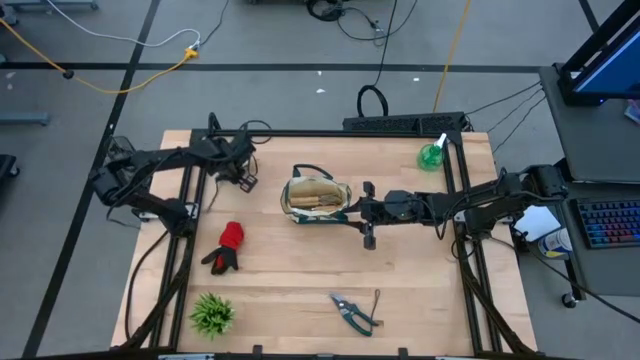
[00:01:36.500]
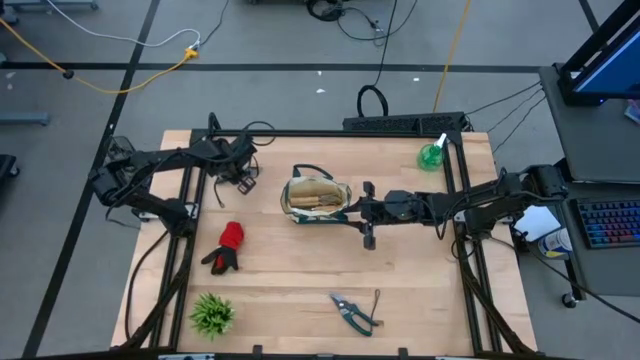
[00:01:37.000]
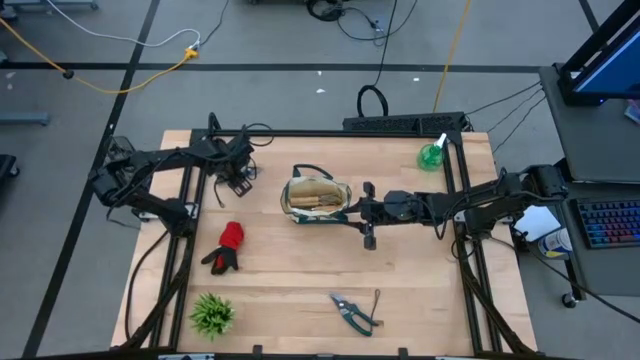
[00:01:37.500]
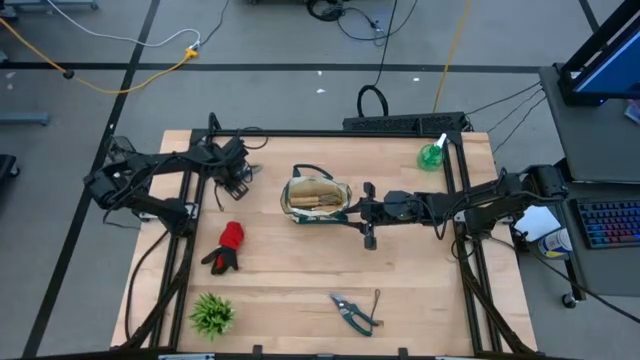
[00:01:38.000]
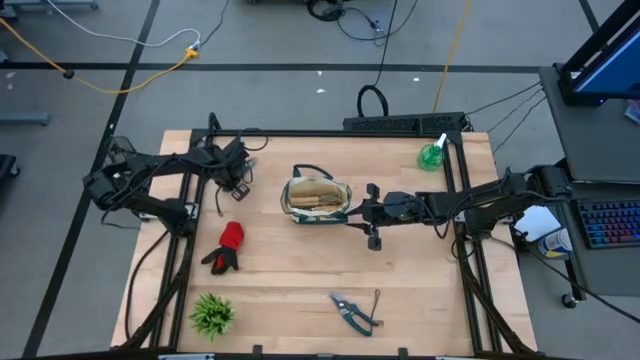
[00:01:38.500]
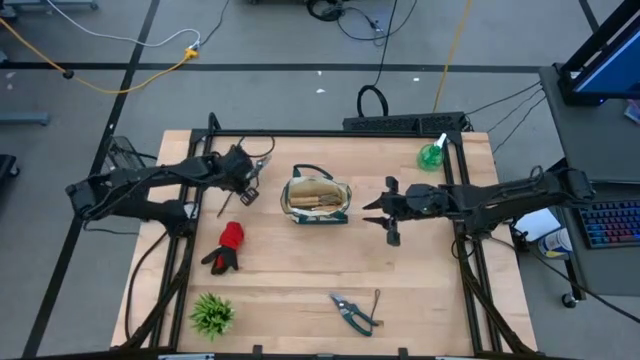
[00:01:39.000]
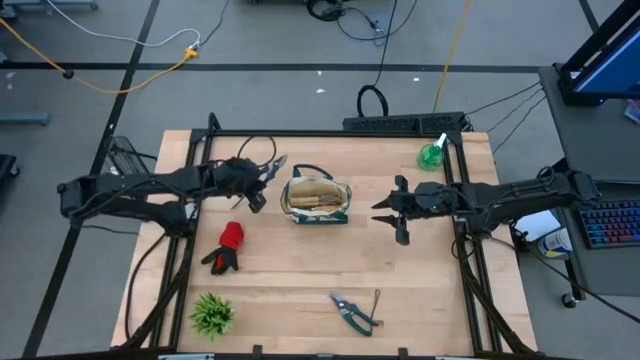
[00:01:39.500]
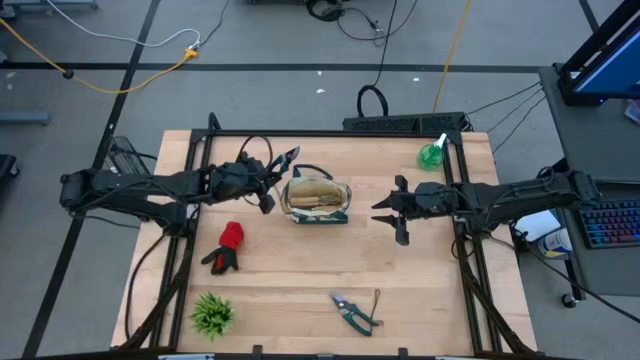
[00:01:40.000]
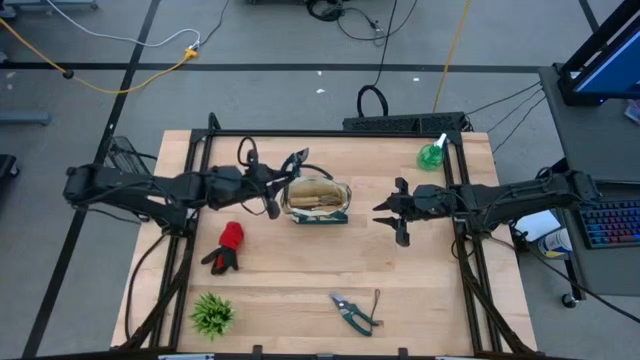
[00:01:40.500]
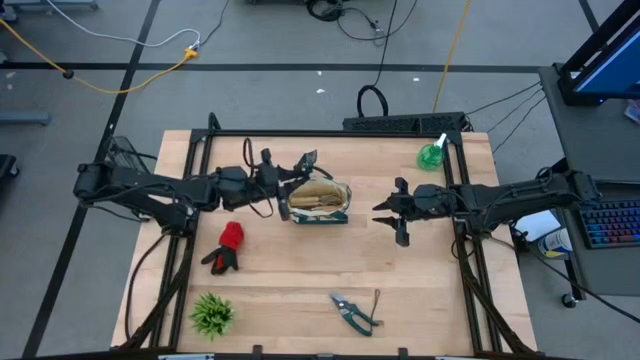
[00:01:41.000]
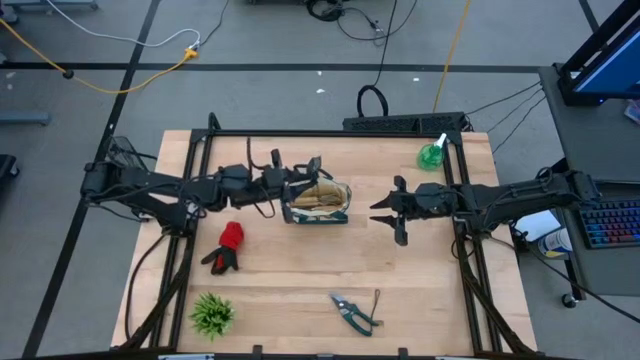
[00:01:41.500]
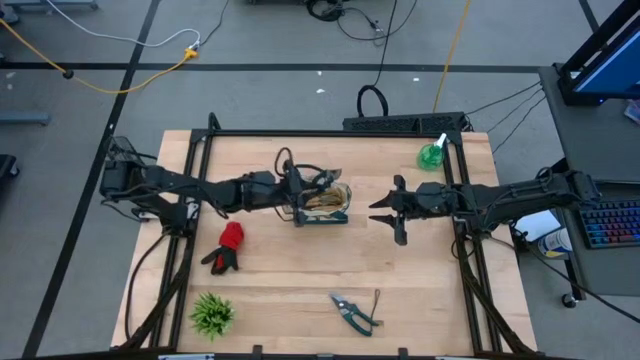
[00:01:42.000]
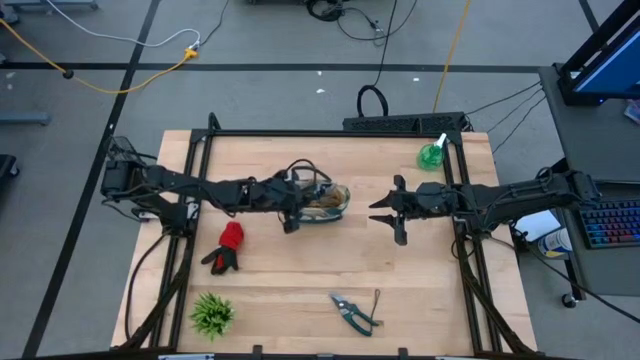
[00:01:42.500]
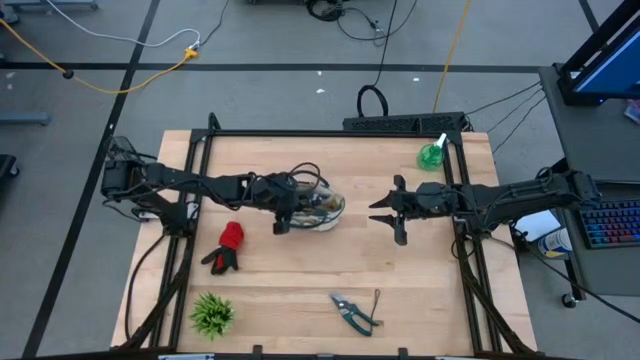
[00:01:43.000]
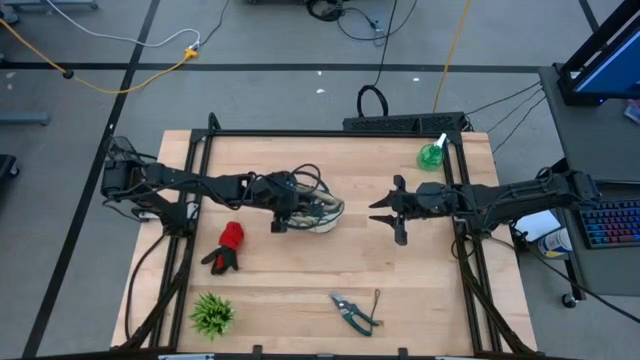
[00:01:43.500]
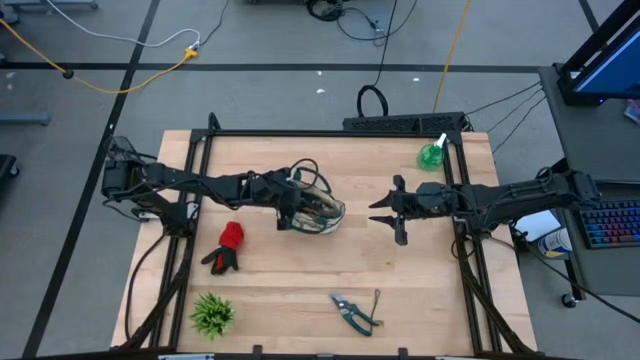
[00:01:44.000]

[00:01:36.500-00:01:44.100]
Task: Pick & Place Garden tools in Gardening bag
Put the top green shear scissors into the gardening bag

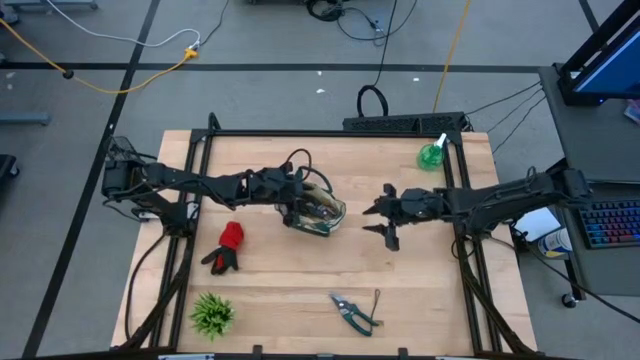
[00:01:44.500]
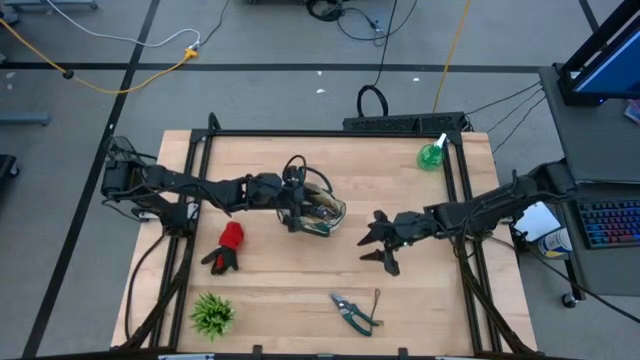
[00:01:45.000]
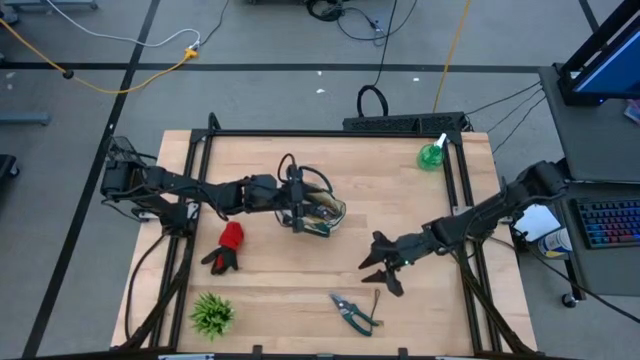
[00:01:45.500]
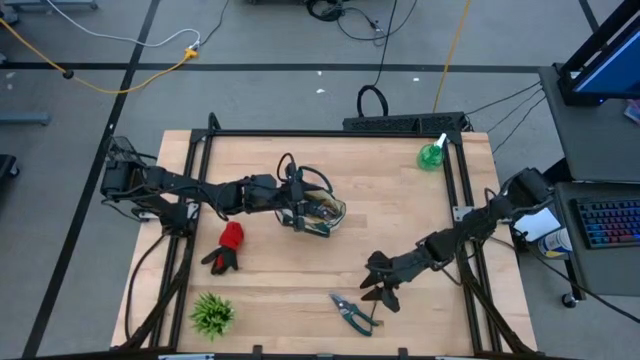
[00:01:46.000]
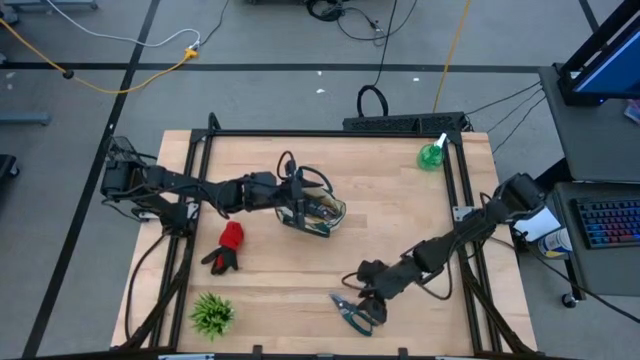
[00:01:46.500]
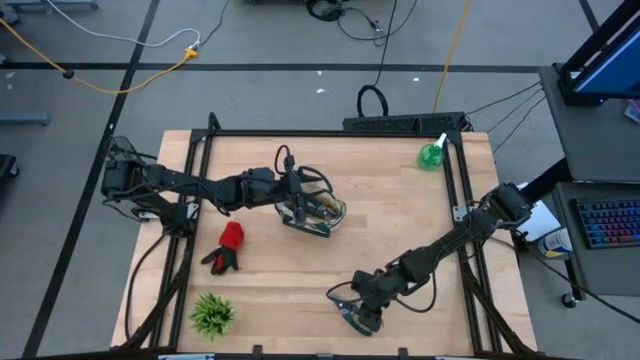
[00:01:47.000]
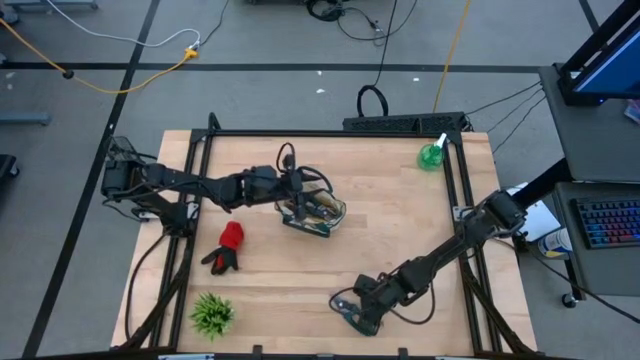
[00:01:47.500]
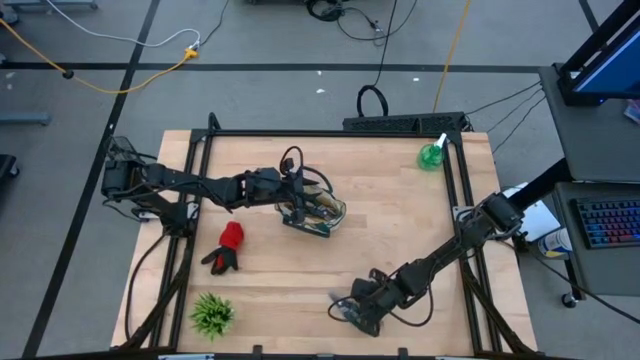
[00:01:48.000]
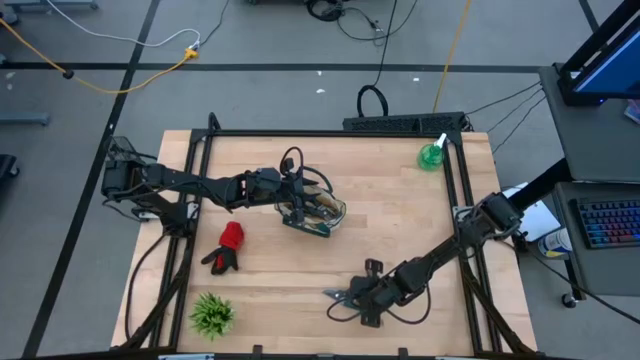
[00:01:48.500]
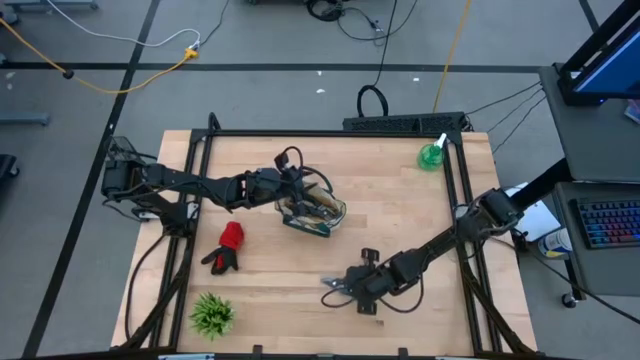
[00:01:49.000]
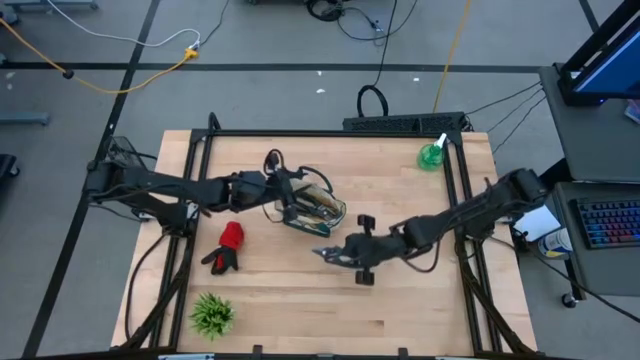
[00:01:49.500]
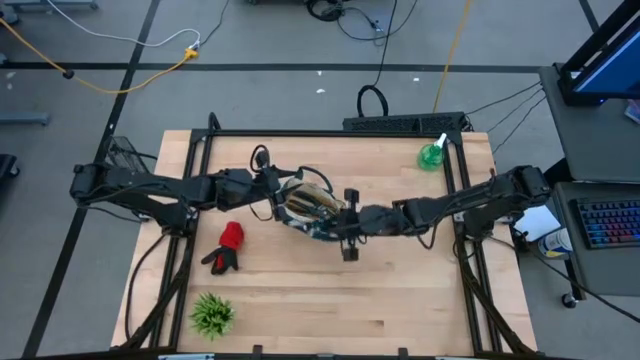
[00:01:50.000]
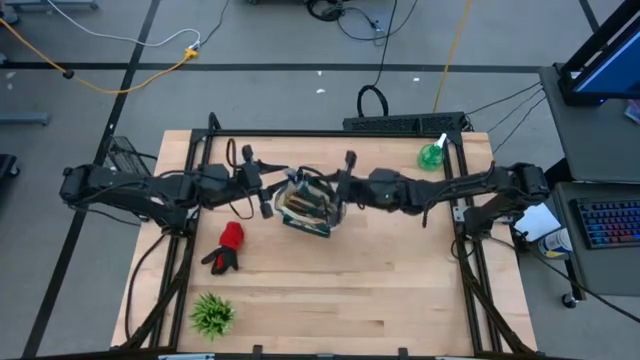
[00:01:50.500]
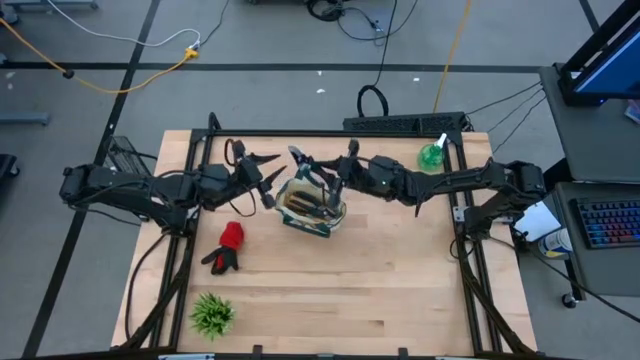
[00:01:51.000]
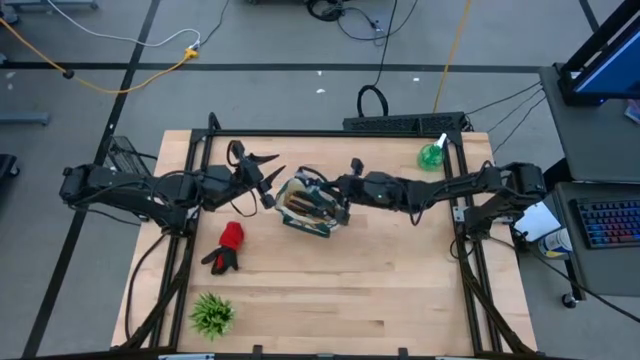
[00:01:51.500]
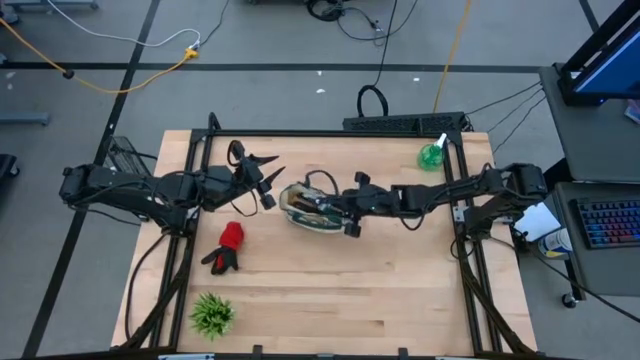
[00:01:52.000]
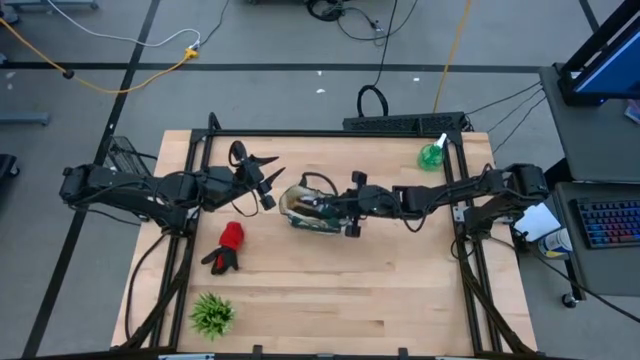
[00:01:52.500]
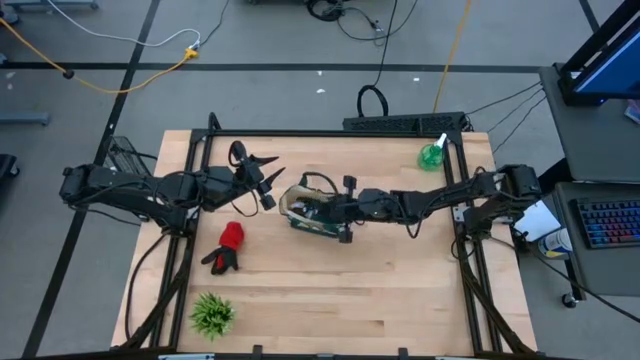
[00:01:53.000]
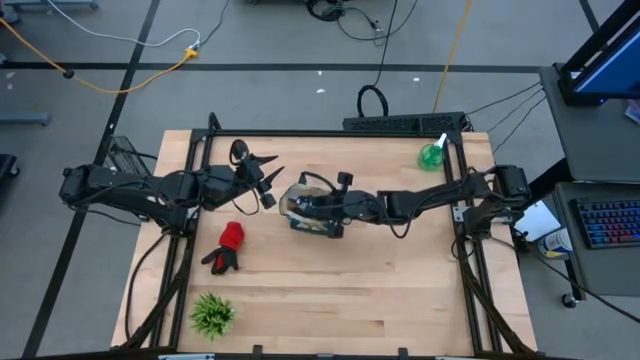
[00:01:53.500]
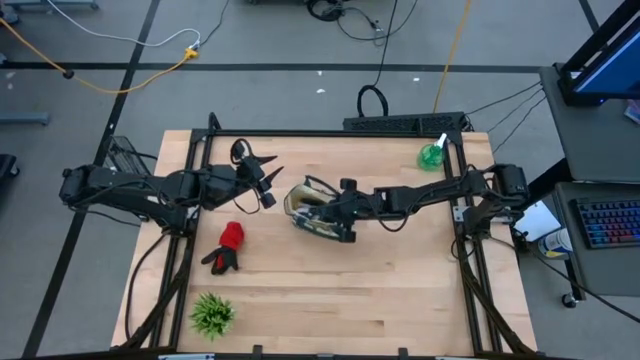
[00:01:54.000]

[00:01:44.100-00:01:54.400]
Put the green shear scissors into the gardening bag

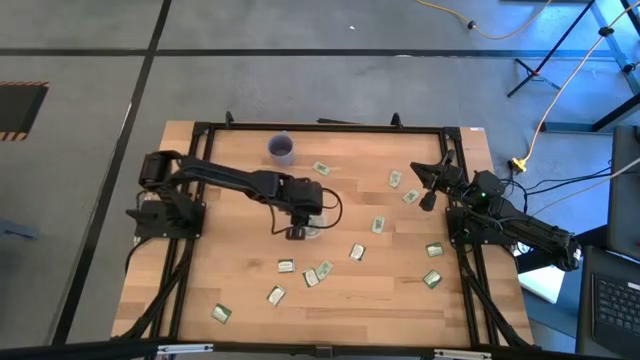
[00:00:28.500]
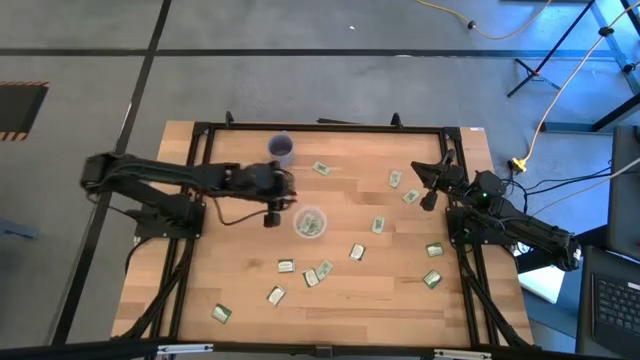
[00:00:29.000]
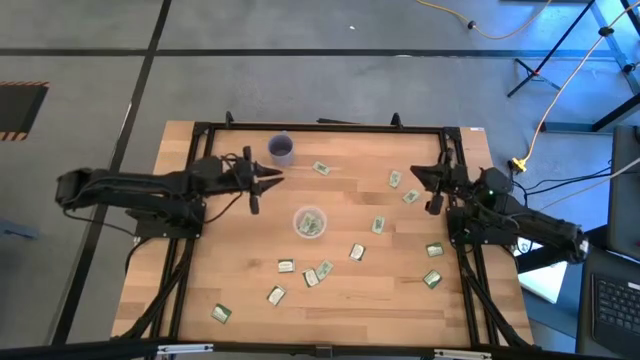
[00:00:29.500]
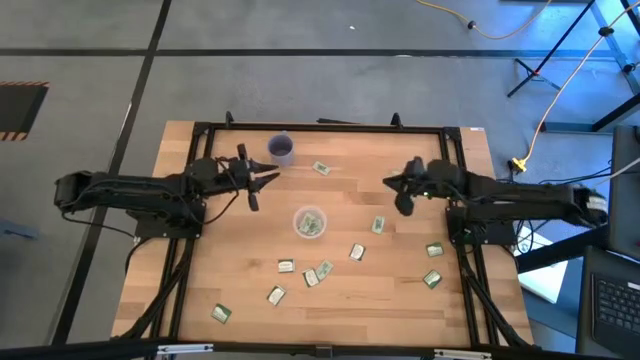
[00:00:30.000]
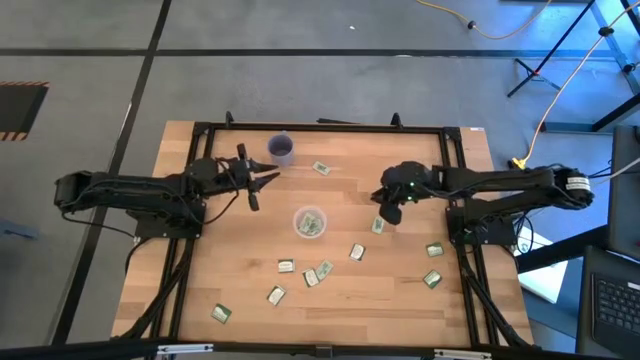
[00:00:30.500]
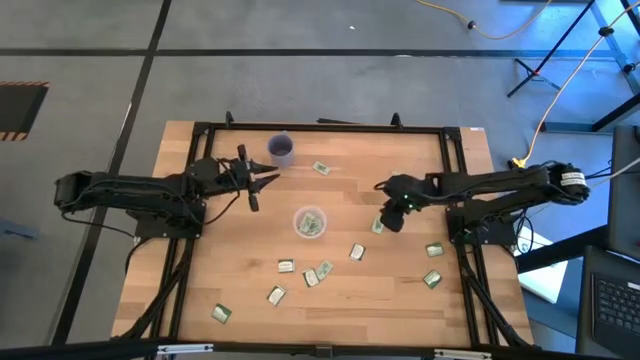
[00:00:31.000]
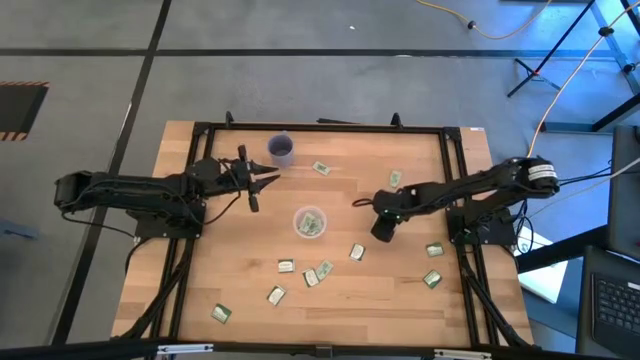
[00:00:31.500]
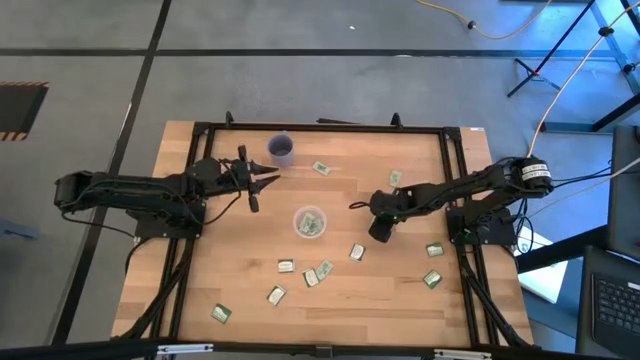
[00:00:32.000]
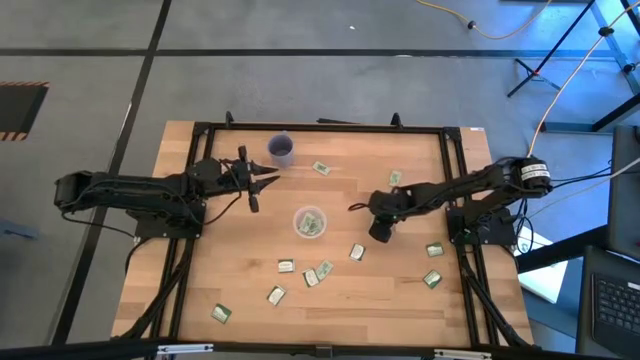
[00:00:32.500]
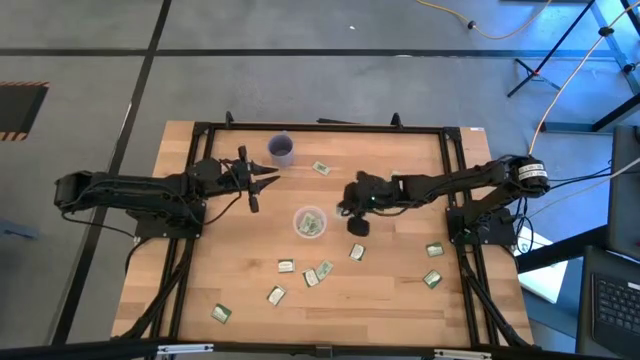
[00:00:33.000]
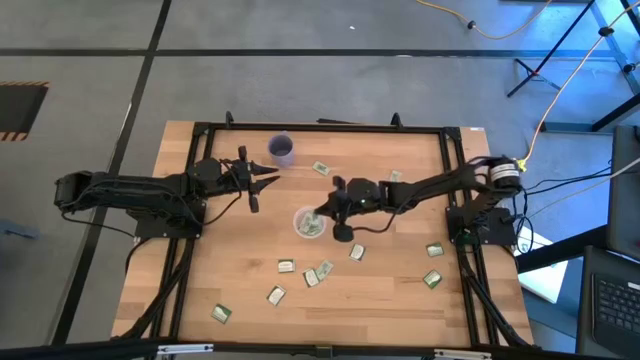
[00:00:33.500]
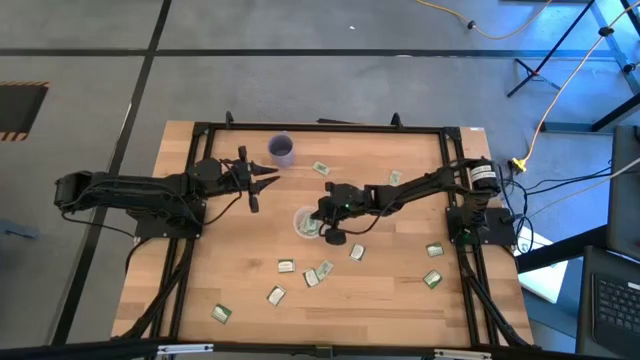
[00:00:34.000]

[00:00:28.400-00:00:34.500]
Task: Pick and place Stevia / Truvia into bins
Put the stevia packet into the transparent container
